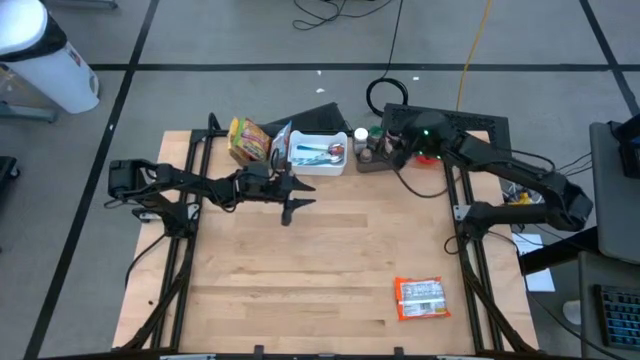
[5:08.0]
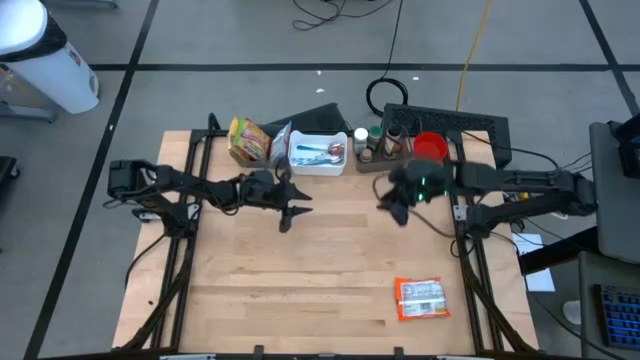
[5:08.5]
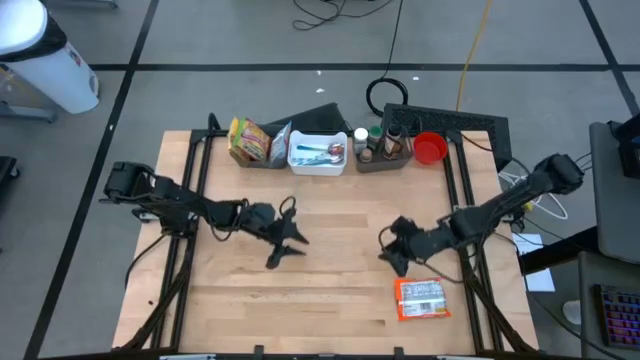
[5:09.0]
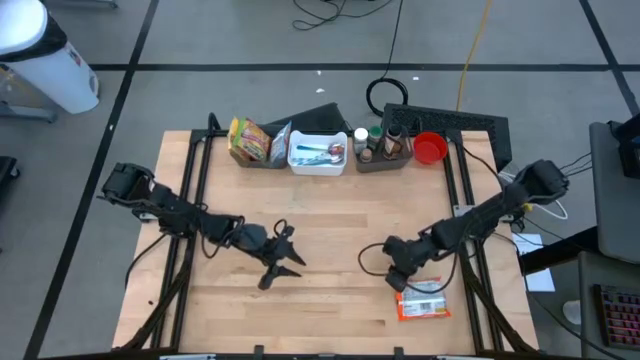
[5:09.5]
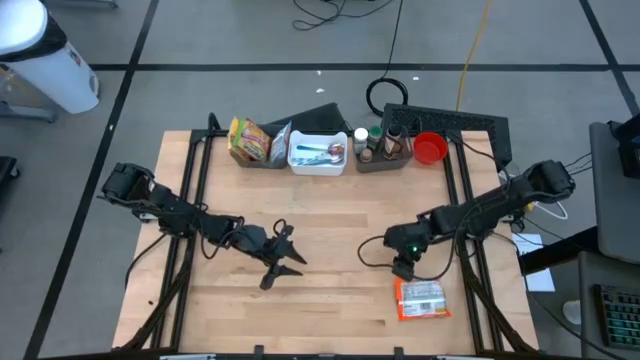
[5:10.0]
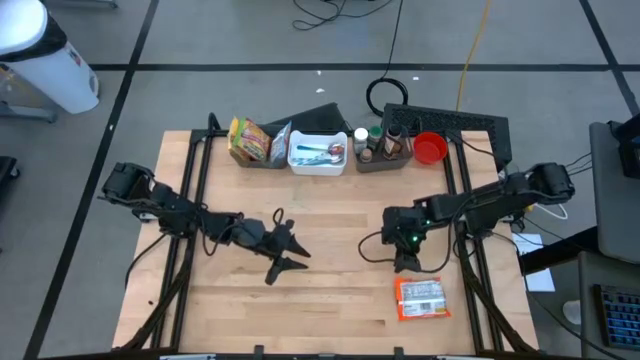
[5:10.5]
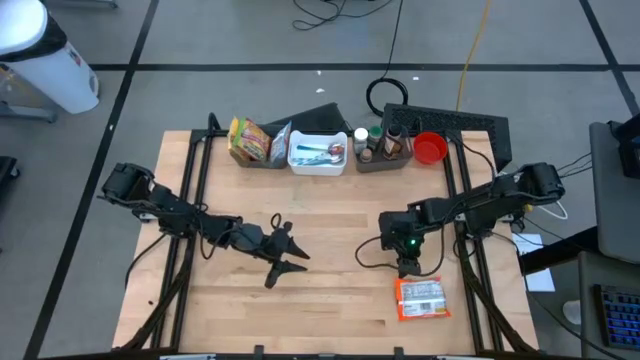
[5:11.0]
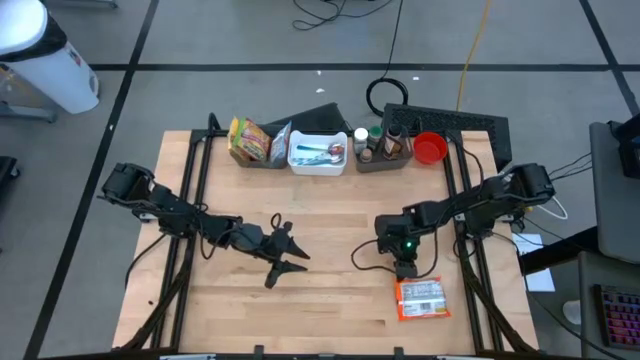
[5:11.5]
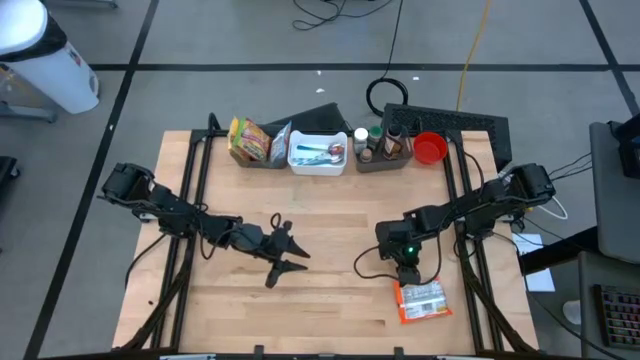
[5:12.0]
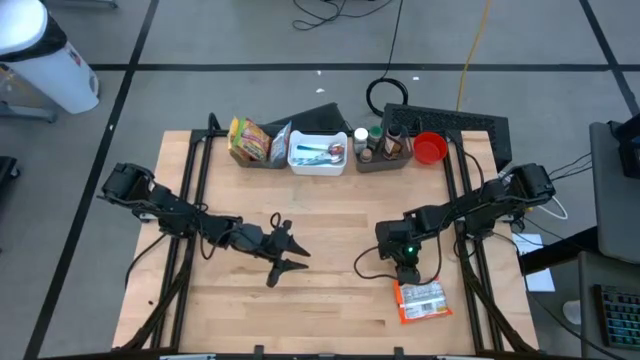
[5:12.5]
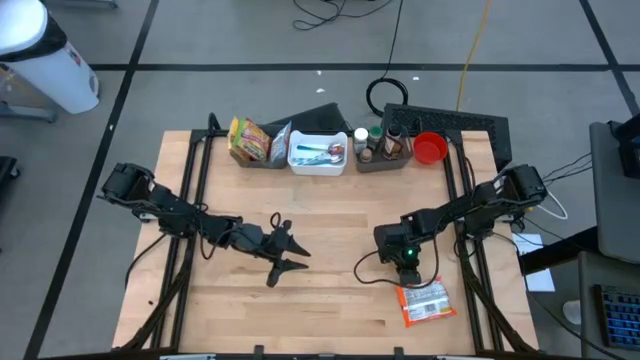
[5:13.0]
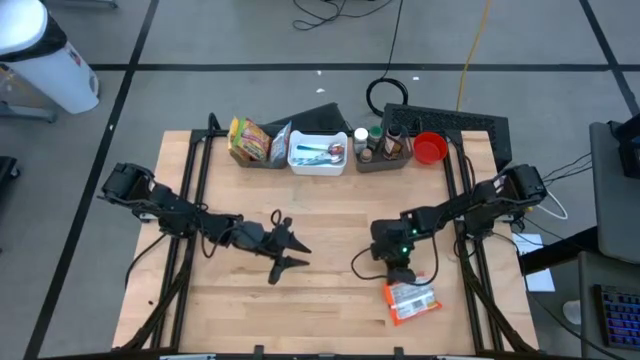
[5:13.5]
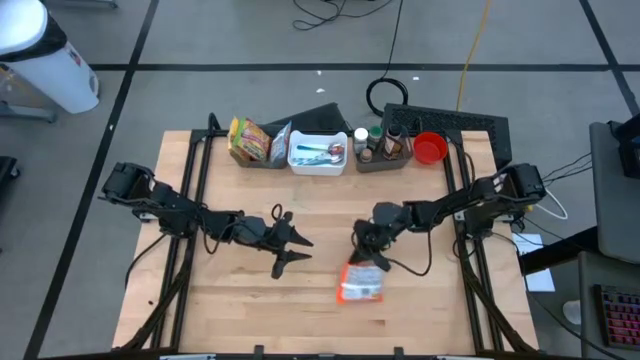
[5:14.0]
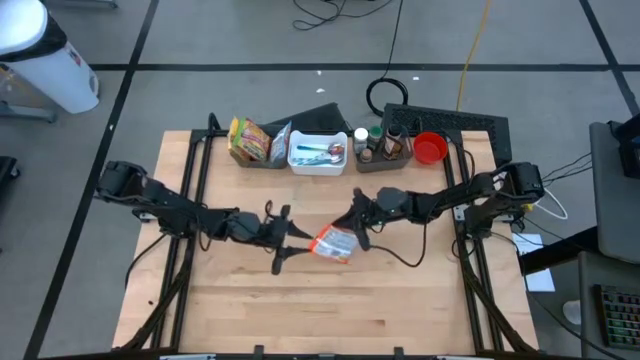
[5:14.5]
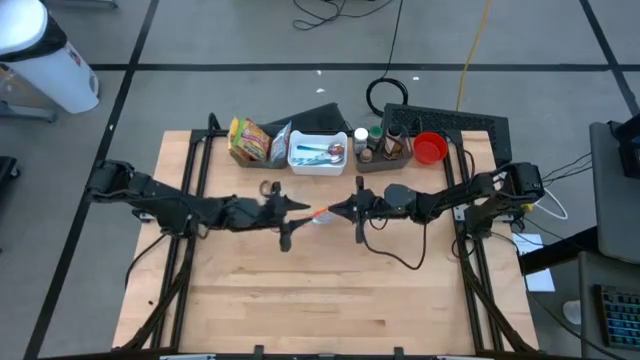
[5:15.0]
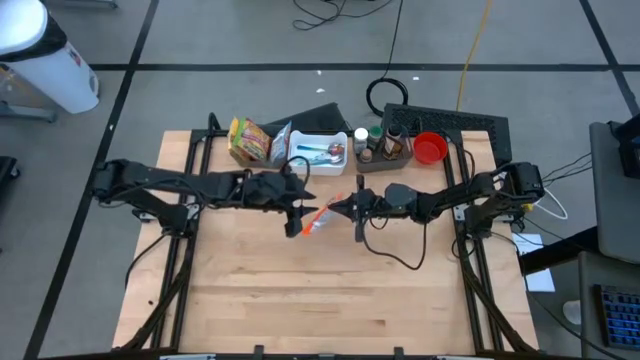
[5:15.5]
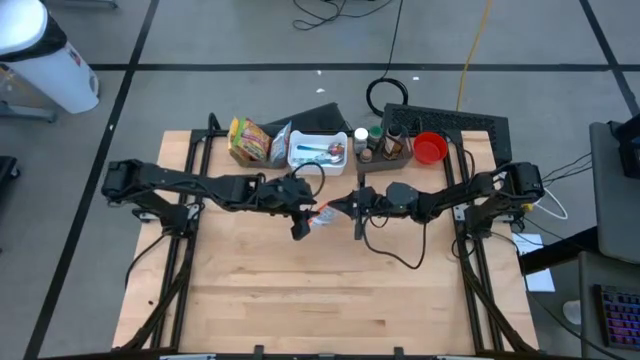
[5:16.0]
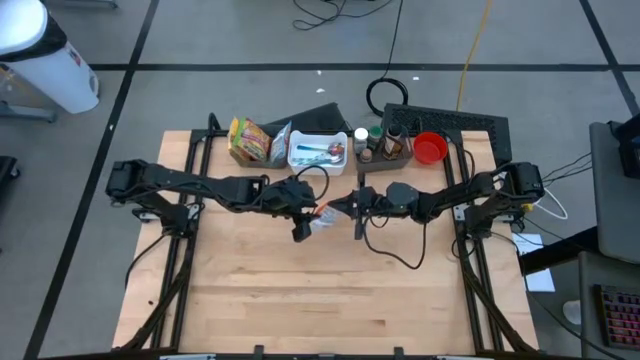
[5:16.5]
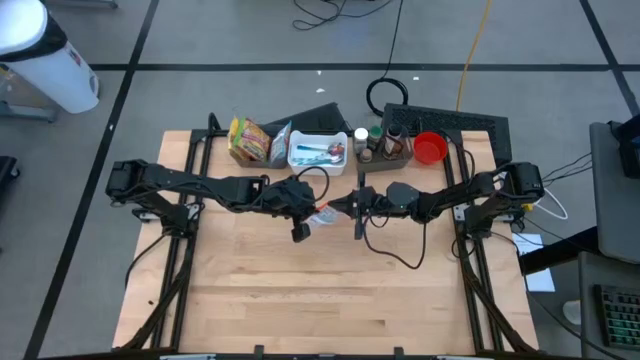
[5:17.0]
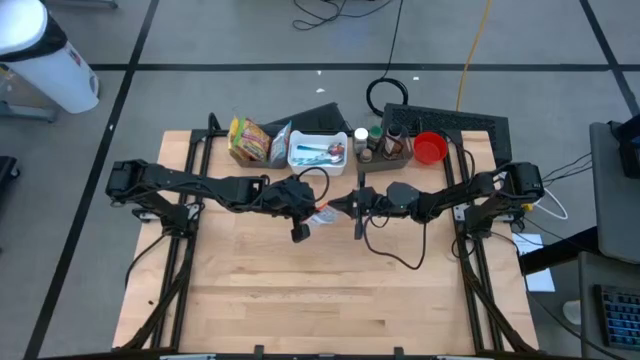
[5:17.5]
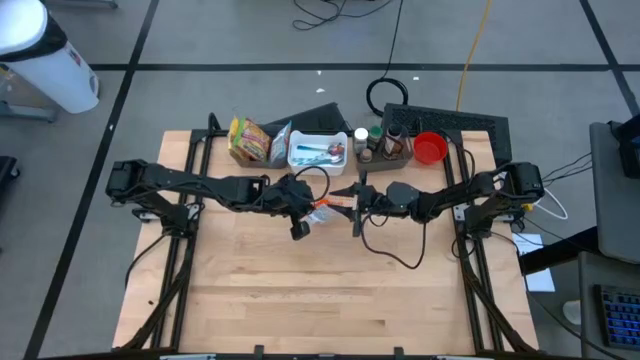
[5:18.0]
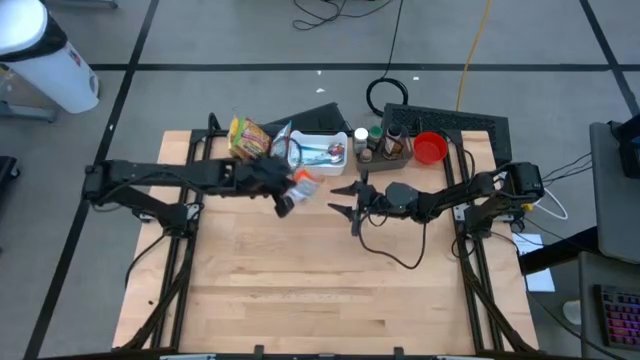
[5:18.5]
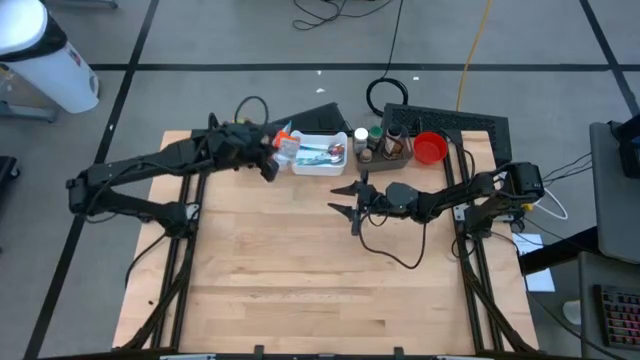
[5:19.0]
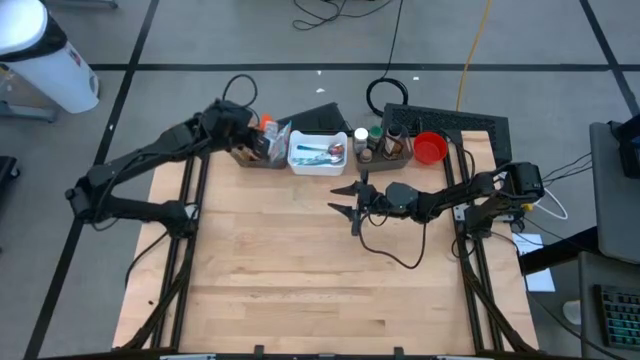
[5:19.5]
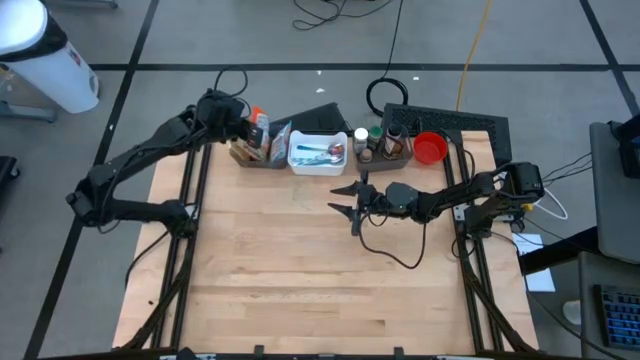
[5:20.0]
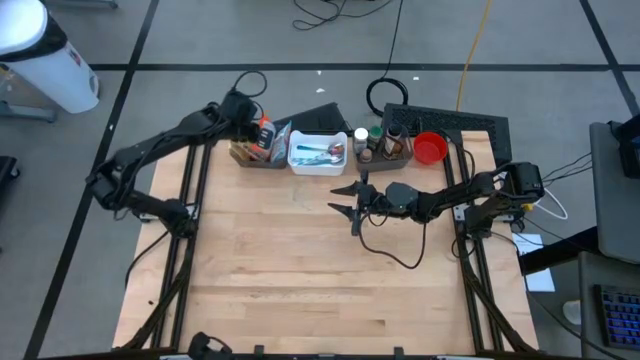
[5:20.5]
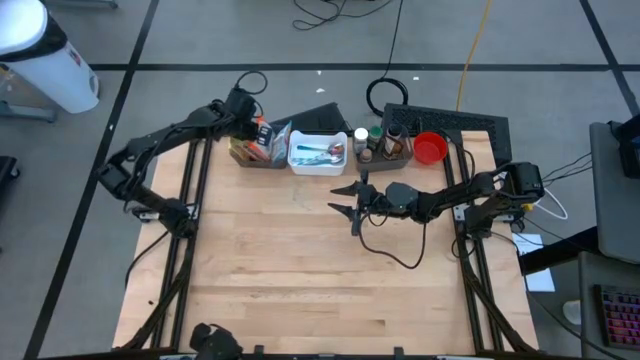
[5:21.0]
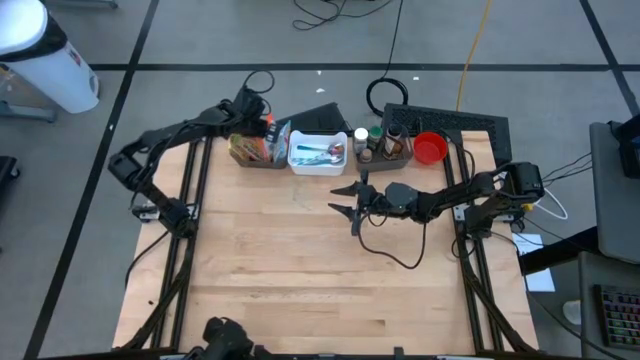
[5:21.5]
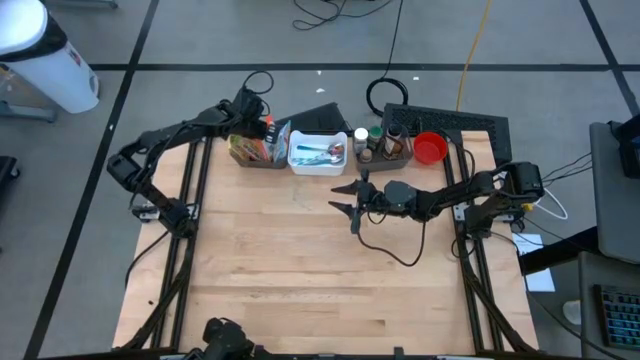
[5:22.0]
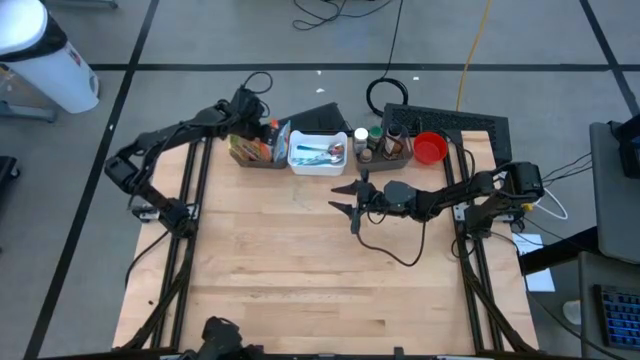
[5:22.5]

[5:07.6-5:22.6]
Task: Pick & Place Food Item
Put the orange noodle pack into the left black bin

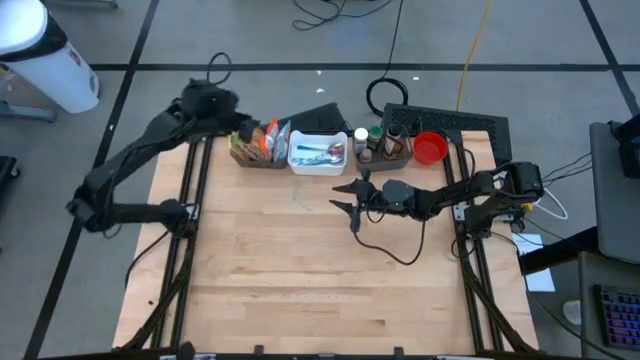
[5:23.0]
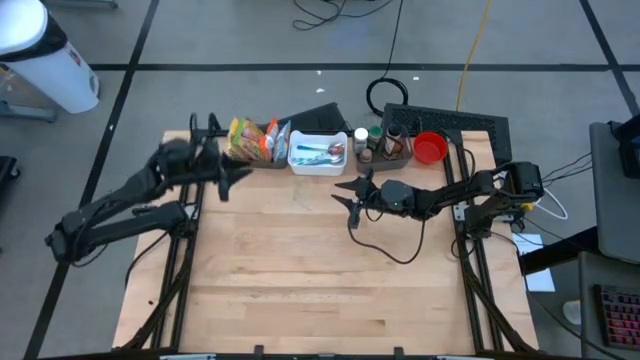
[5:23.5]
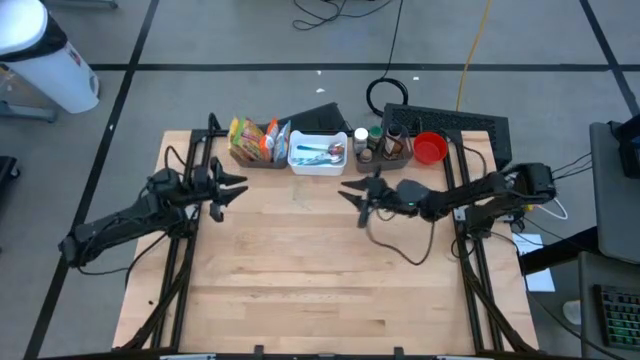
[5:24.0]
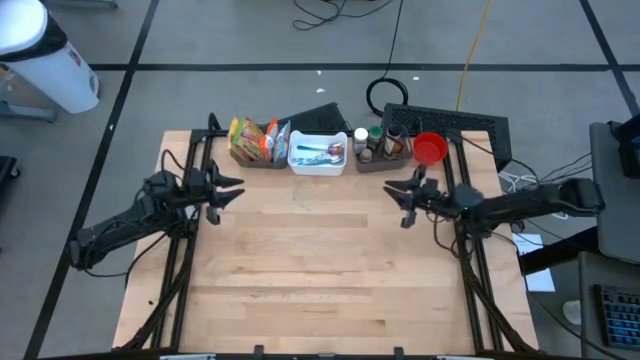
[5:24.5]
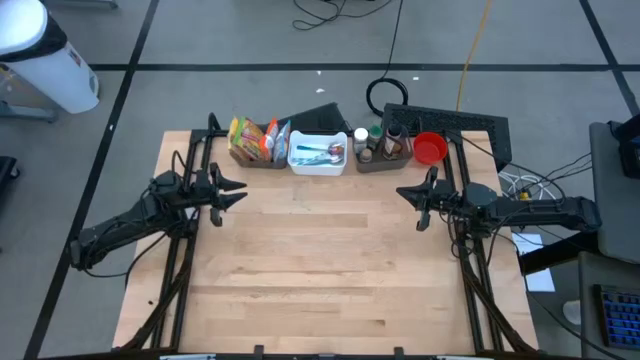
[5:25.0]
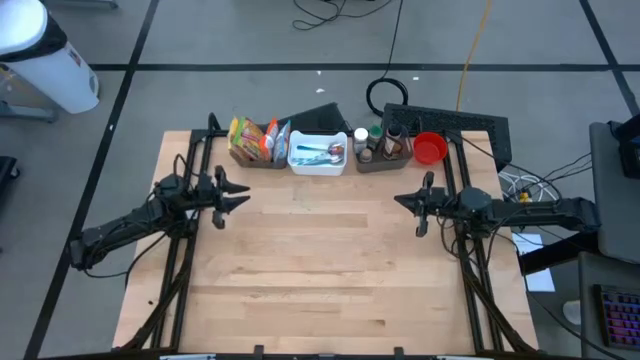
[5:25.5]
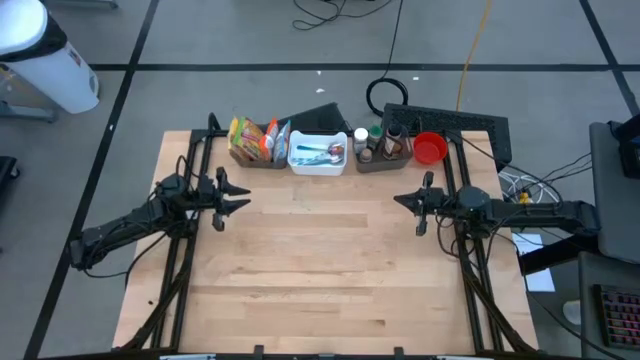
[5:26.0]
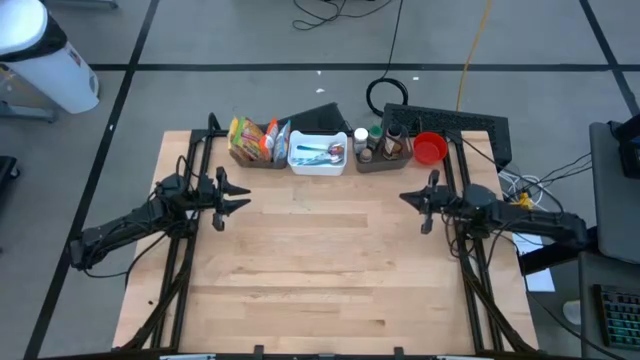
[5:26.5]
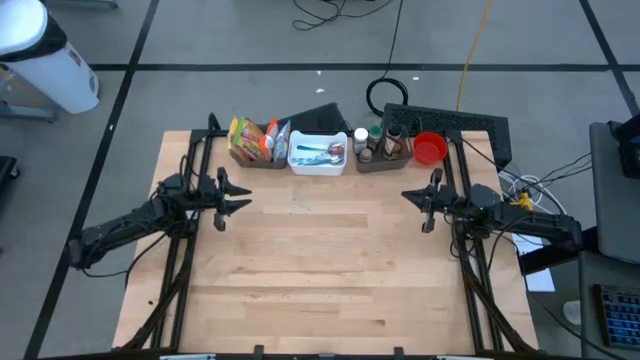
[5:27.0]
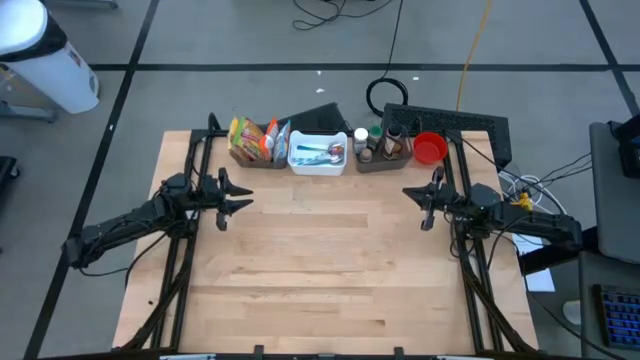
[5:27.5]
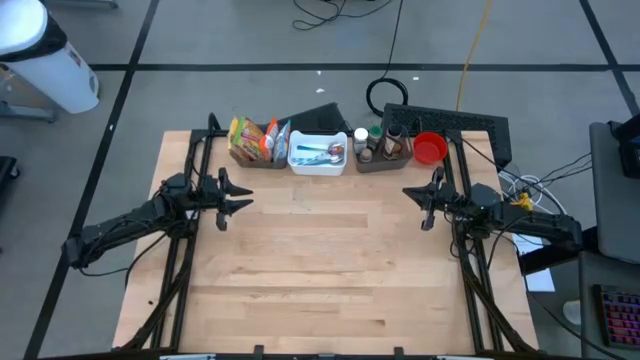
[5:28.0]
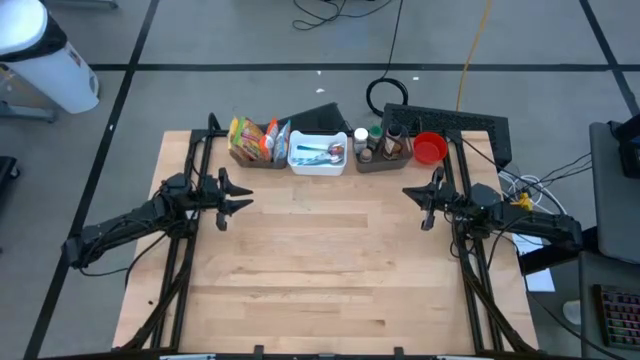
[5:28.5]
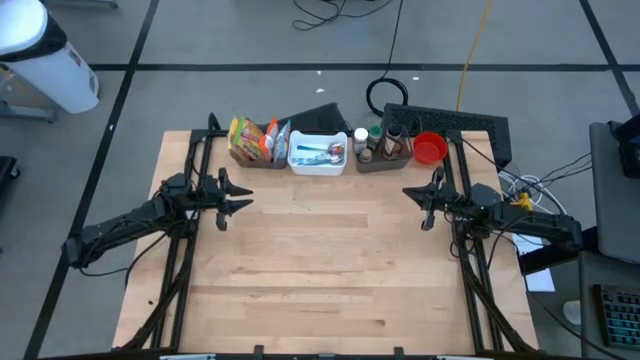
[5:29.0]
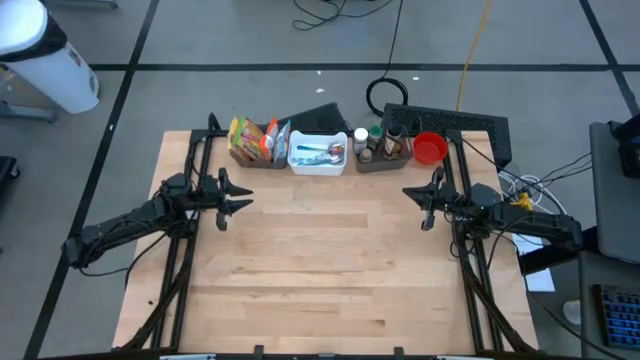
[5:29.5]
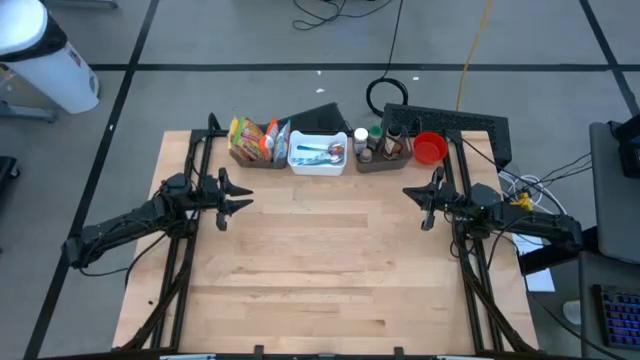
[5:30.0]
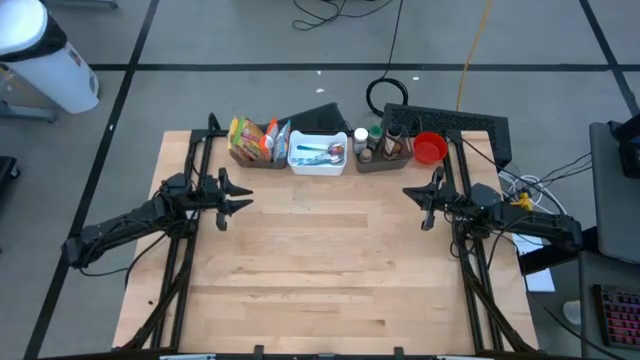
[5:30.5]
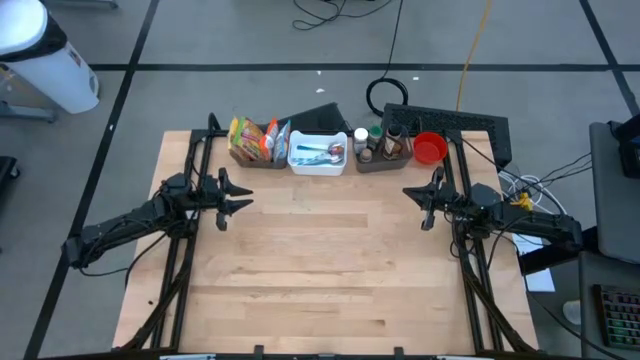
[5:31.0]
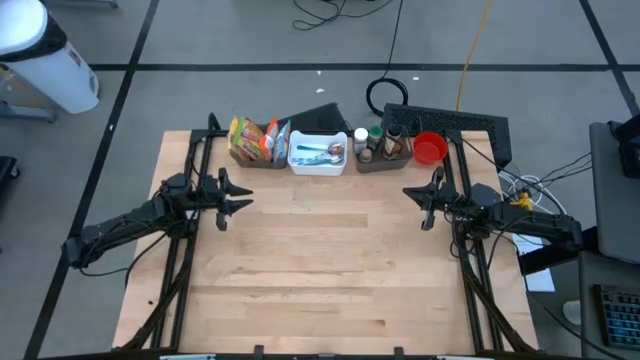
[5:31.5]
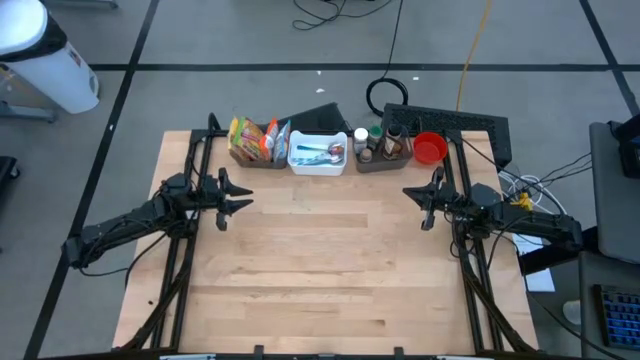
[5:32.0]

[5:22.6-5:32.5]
Return to Home Position
